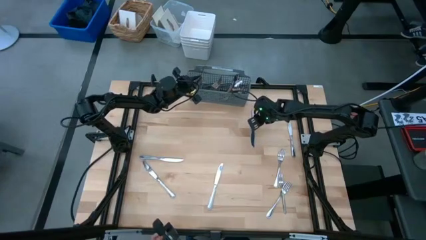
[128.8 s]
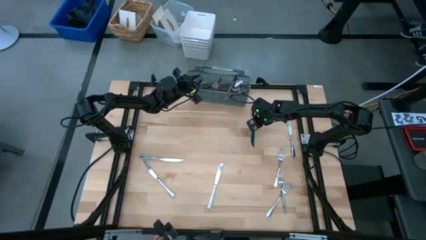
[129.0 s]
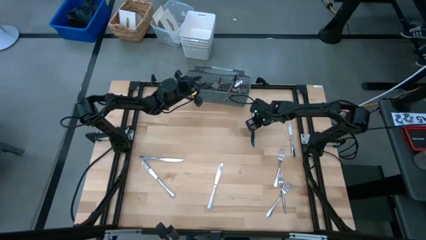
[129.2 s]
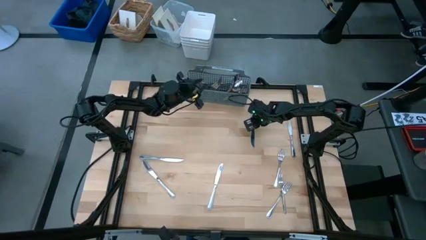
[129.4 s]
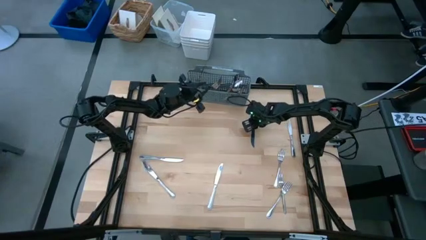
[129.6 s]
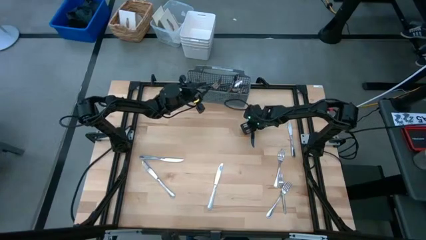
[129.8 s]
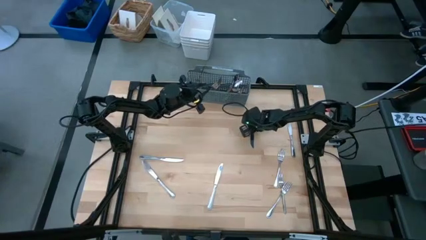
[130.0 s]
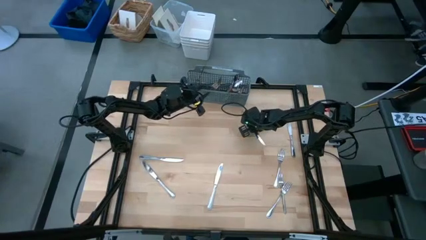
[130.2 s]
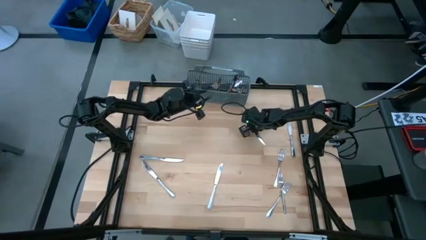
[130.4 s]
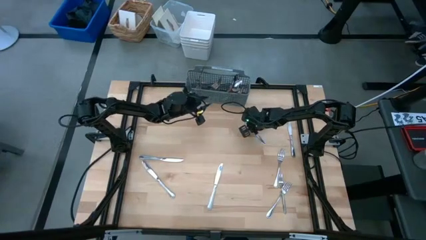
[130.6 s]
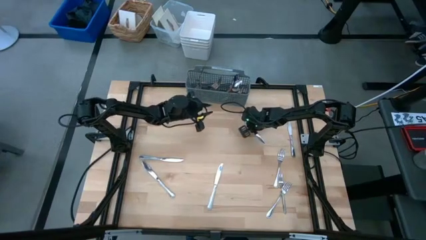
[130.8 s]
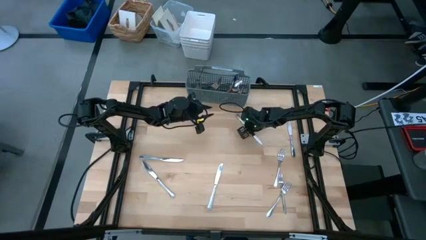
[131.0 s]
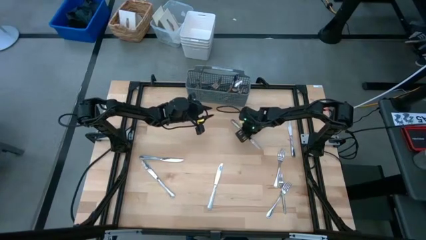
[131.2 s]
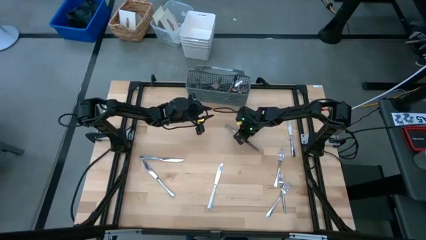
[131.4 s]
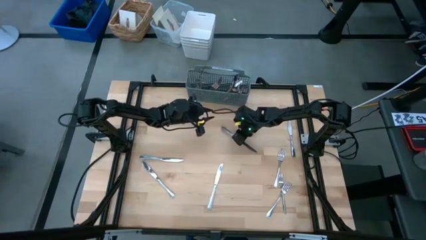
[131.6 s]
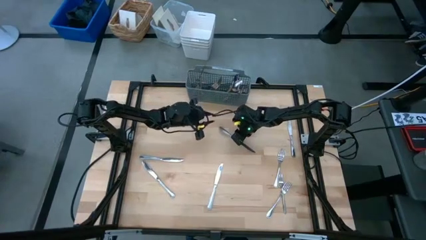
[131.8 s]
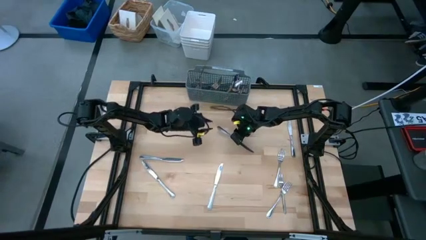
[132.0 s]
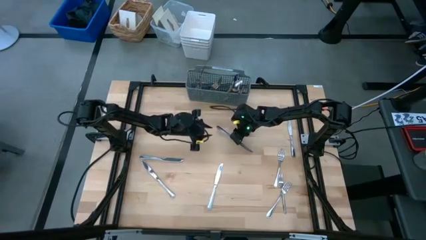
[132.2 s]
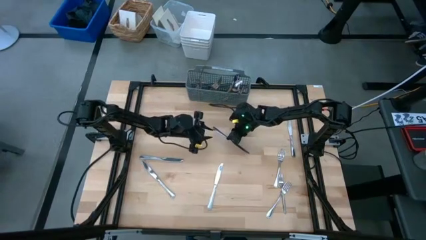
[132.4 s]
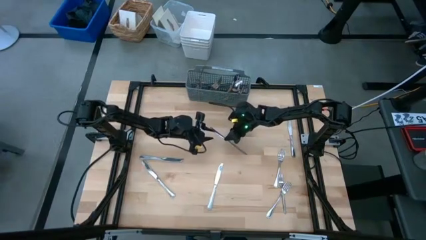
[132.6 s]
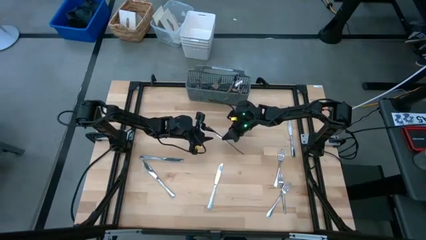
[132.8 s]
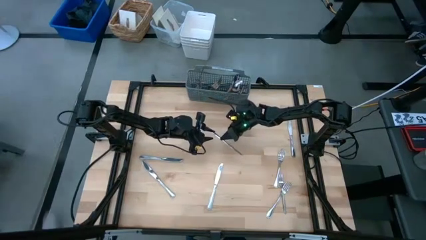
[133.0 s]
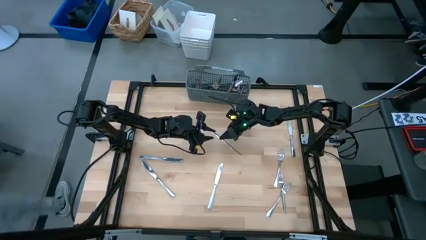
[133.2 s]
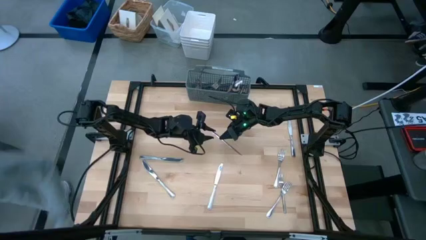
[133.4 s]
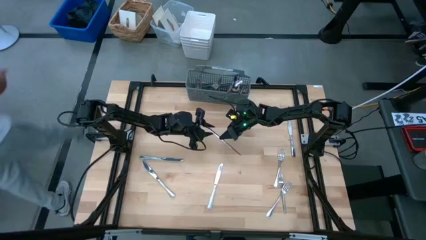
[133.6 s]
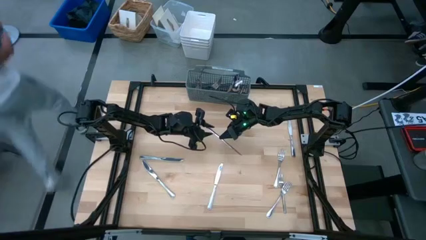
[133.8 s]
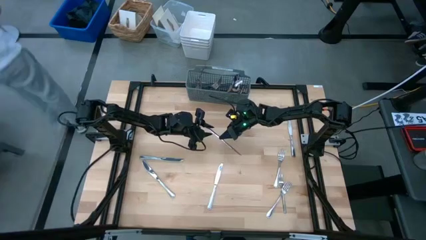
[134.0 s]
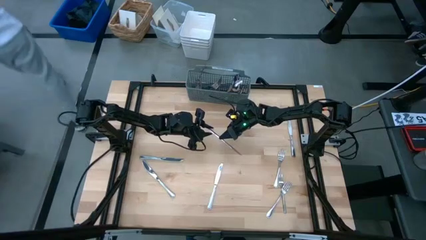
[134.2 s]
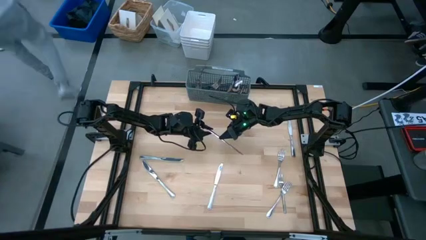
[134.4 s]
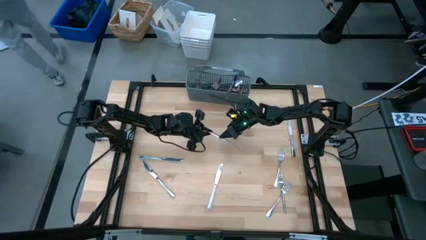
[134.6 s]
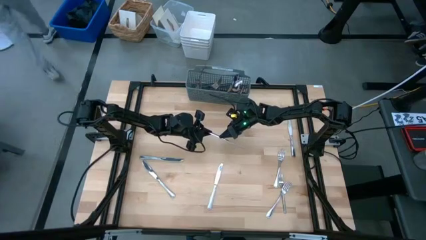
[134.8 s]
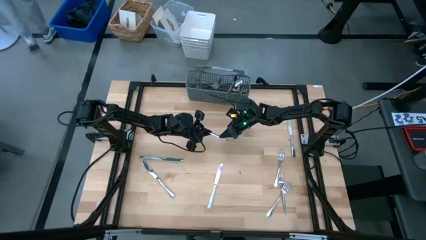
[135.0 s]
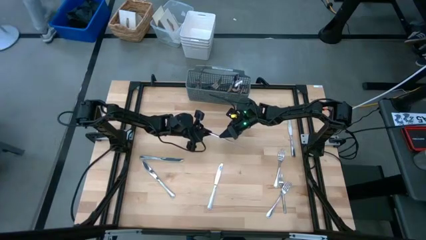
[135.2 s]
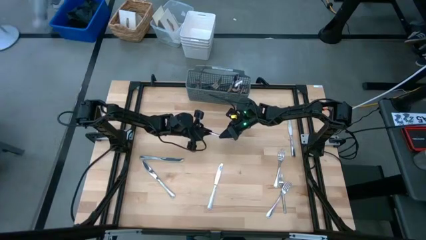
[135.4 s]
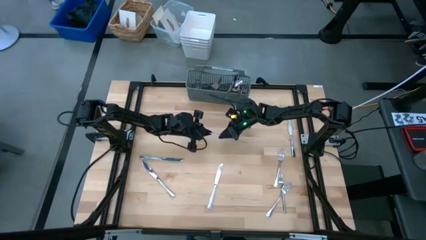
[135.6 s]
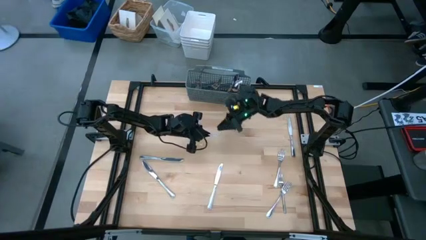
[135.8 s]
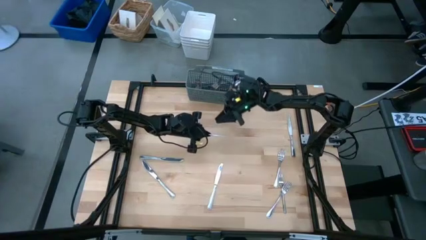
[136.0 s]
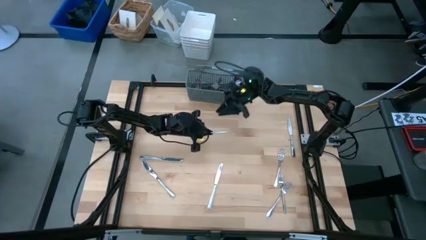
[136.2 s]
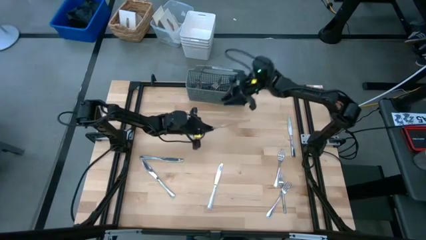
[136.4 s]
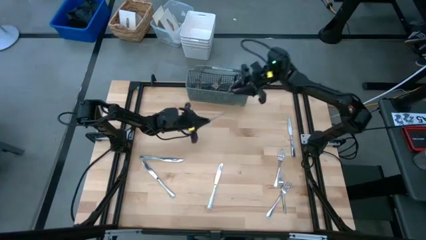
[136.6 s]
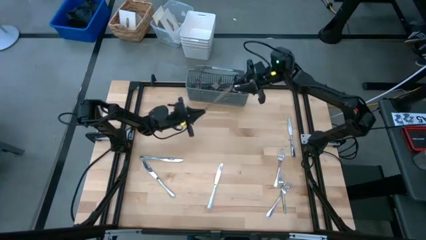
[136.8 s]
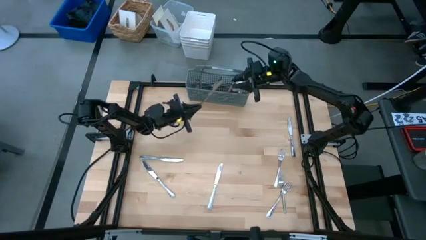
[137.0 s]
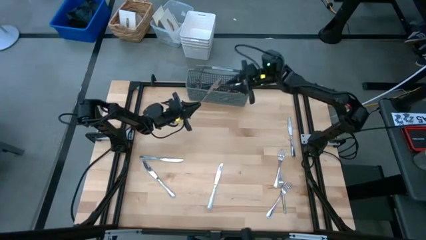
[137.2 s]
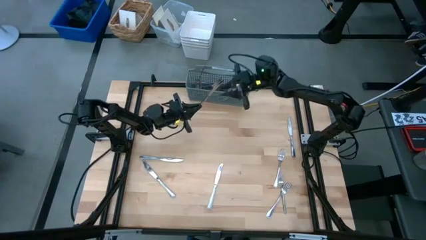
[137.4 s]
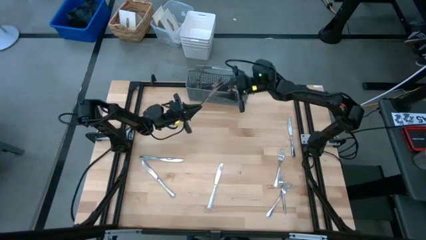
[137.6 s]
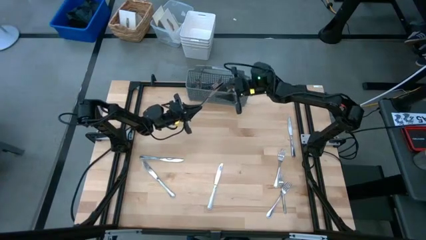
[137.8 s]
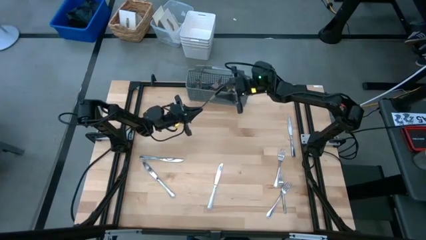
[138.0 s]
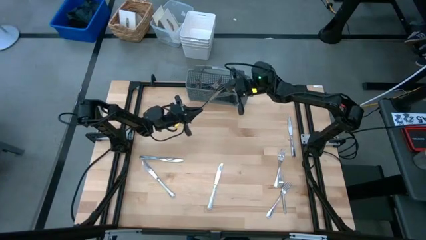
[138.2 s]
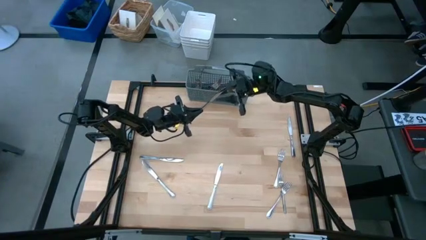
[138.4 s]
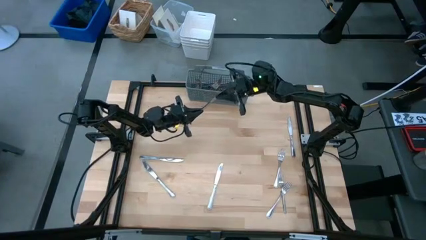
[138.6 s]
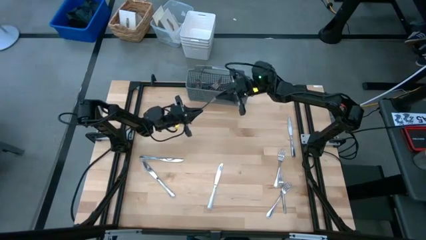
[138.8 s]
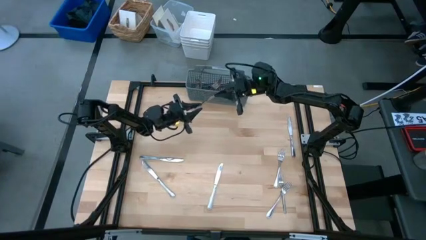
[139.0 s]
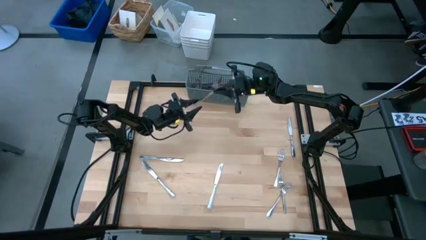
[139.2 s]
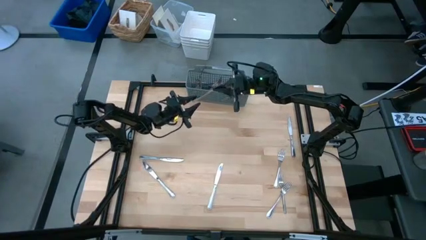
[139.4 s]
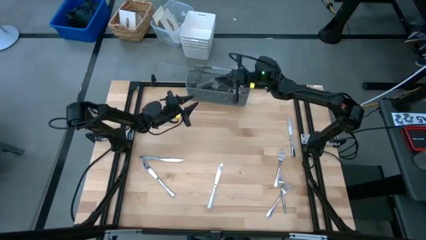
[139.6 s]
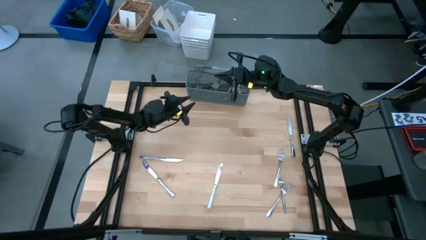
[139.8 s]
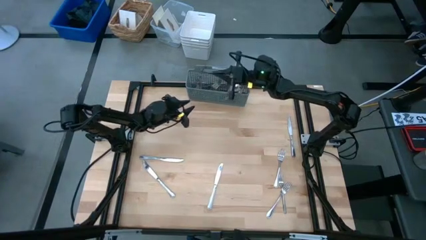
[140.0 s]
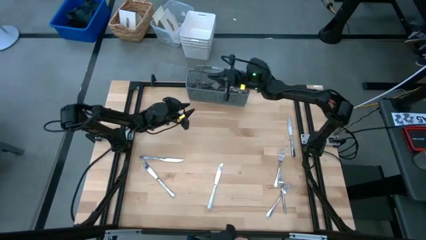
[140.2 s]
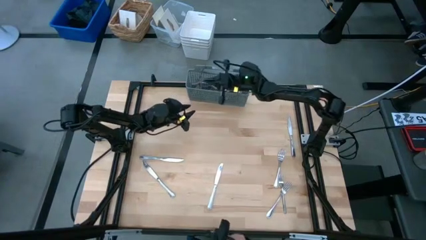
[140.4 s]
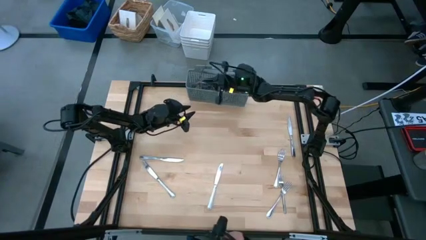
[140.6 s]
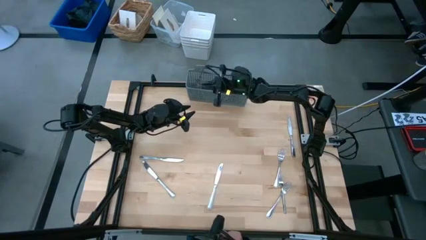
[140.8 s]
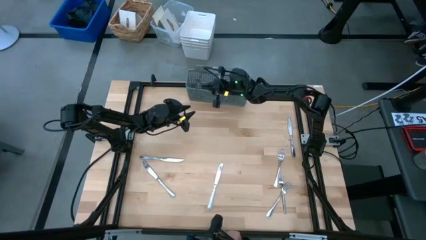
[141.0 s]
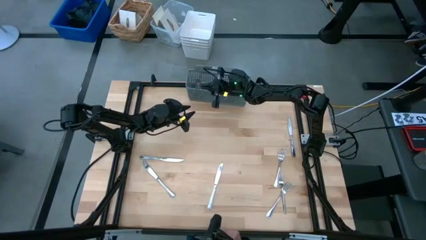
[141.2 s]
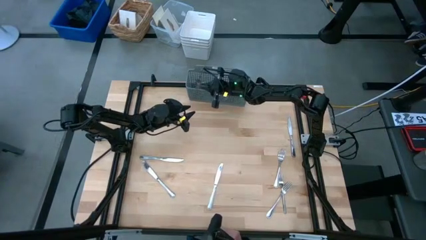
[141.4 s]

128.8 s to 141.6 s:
Task: Sort silverware
Put the table knife into the gray silverware organizer

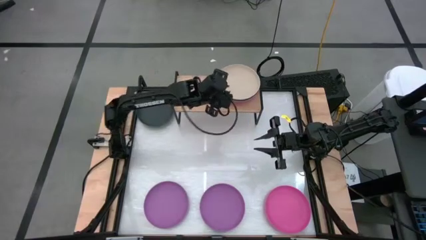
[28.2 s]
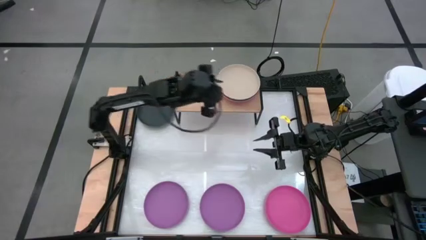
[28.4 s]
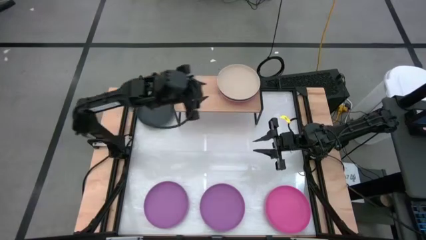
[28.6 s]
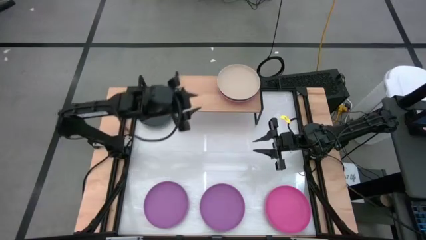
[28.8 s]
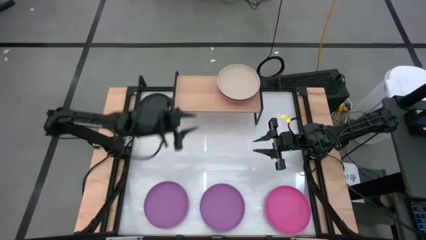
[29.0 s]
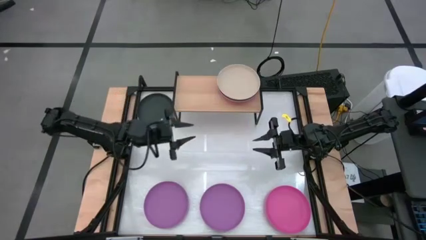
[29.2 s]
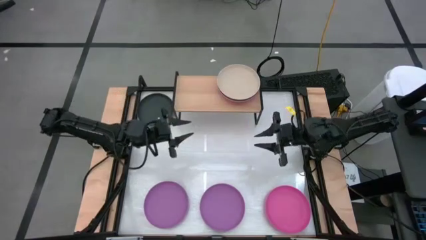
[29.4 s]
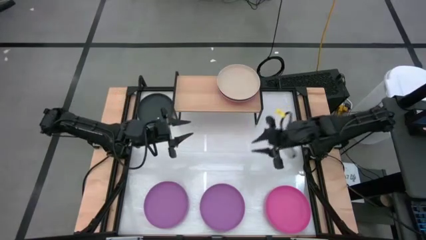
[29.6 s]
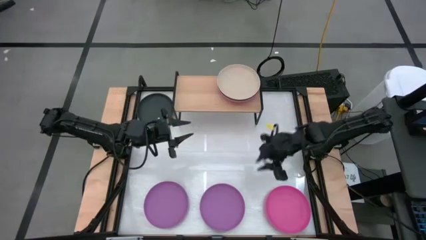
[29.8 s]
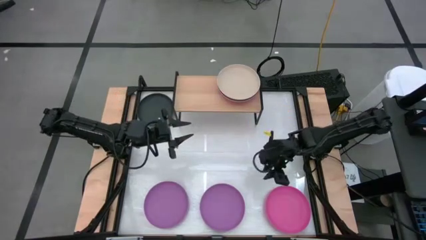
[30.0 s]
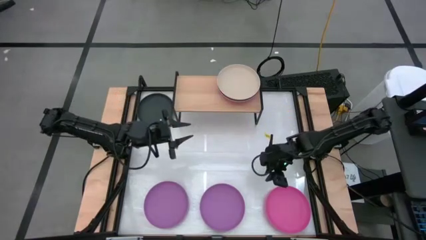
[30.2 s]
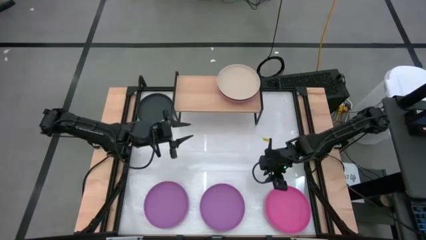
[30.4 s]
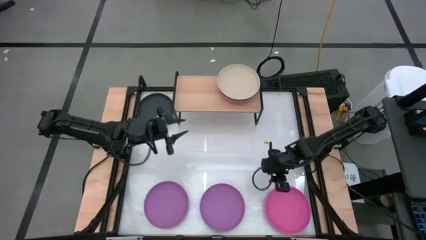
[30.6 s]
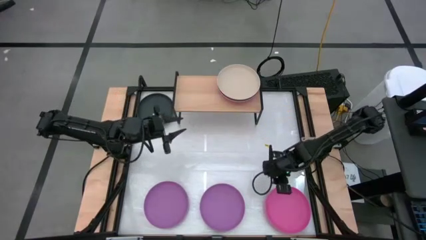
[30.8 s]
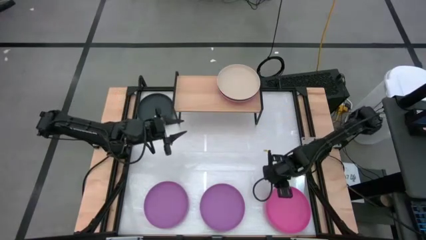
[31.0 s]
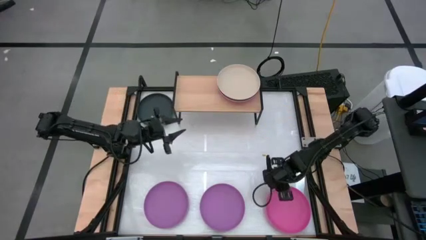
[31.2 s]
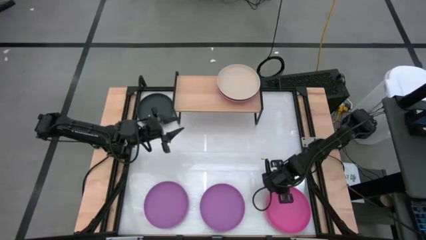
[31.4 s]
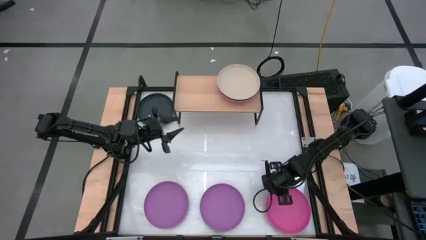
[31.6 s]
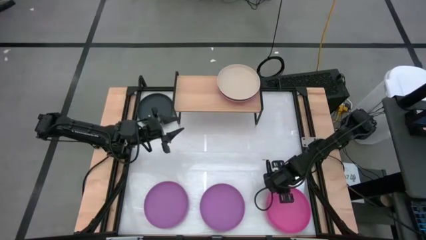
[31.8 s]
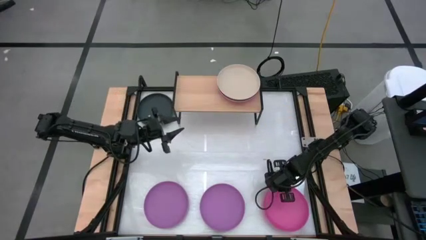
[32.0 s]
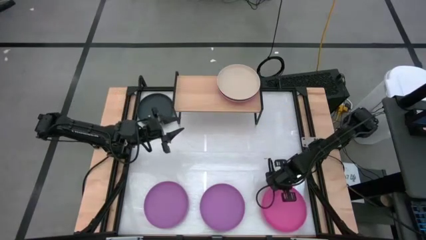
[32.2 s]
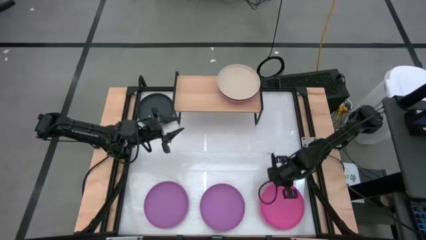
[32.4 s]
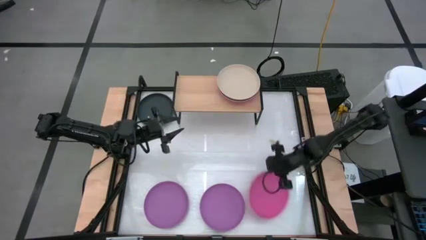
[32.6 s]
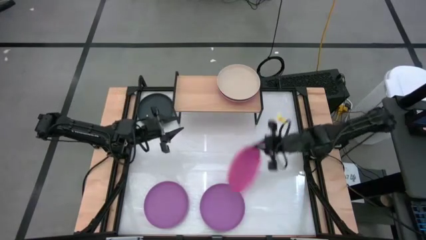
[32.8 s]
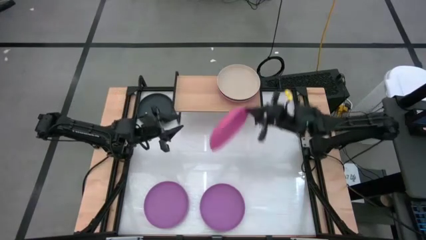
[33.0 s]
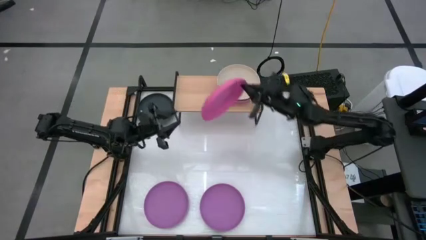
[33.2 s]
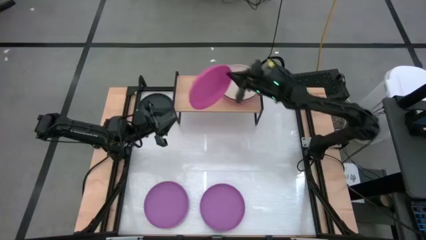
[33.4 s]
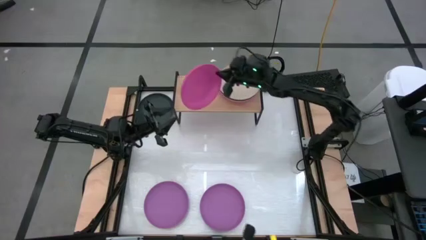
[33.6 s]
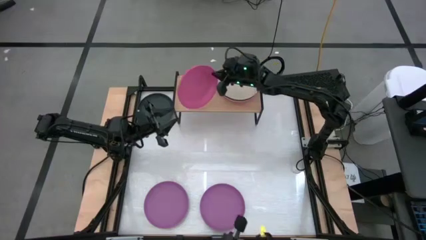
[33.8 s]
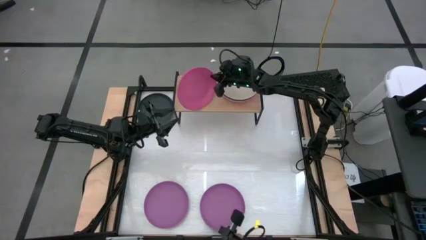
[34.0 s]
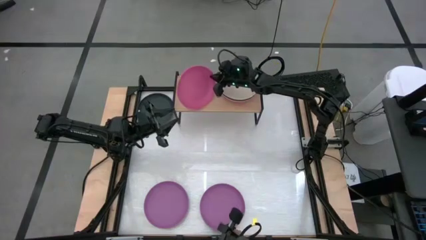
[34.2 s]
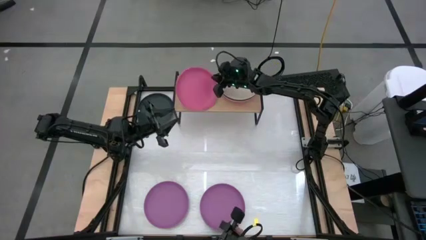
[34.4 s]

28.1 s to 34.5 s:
Task: Place and stack plates onto a shelf
Put the pink plate on the shelf
